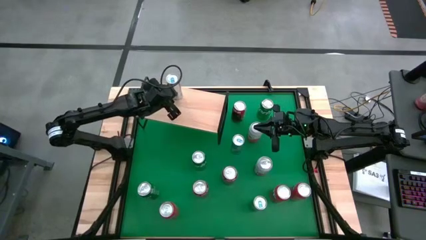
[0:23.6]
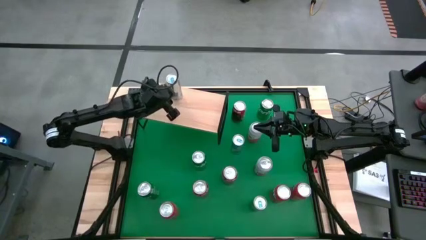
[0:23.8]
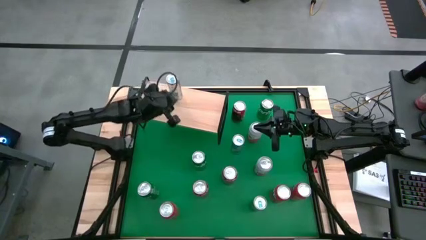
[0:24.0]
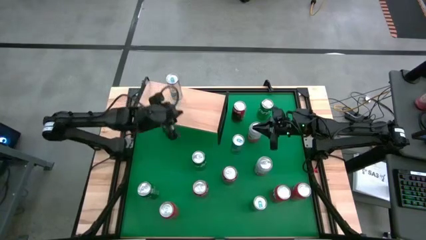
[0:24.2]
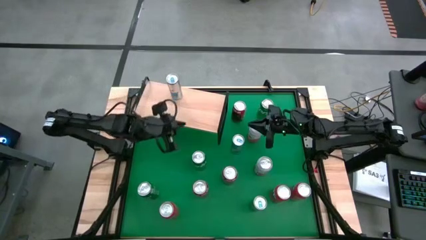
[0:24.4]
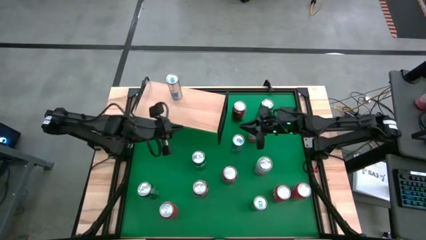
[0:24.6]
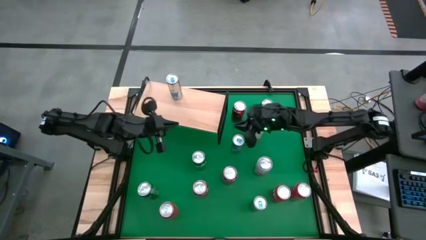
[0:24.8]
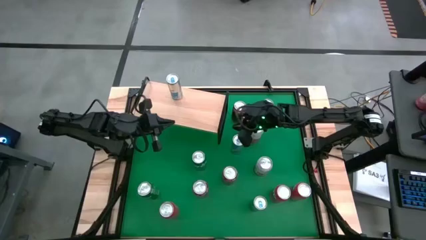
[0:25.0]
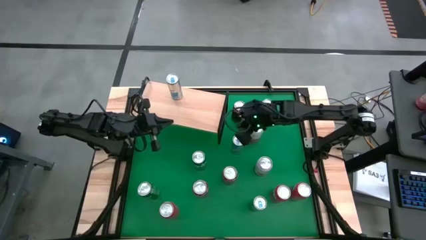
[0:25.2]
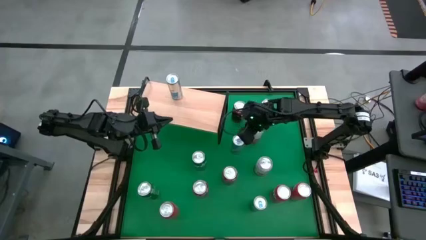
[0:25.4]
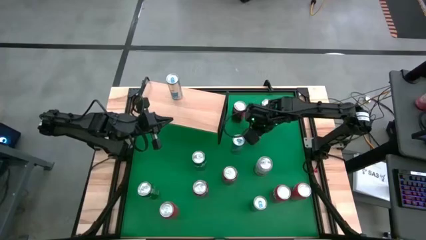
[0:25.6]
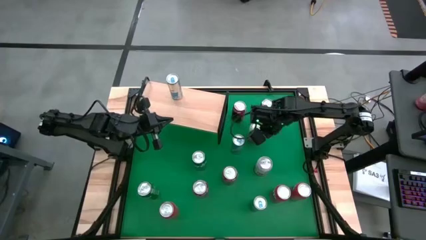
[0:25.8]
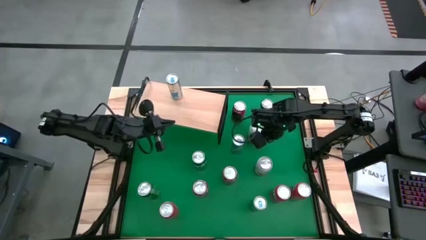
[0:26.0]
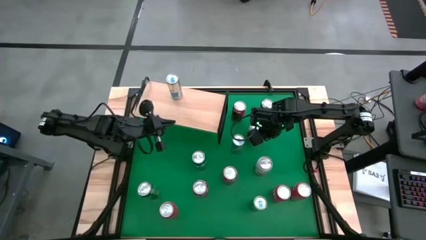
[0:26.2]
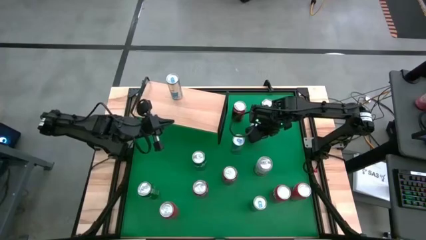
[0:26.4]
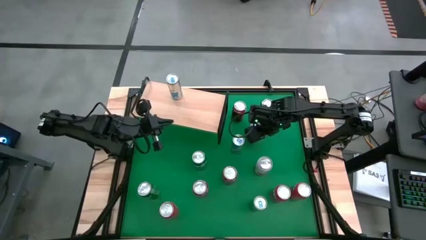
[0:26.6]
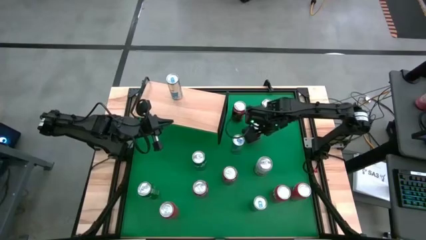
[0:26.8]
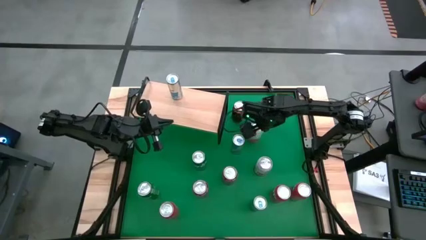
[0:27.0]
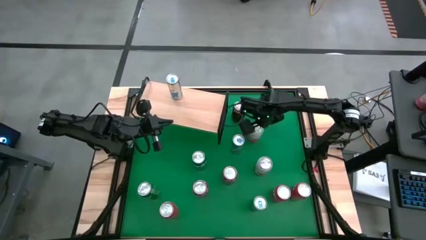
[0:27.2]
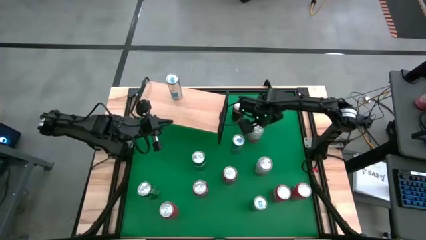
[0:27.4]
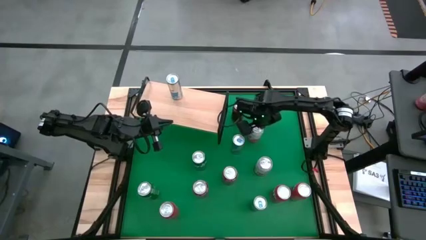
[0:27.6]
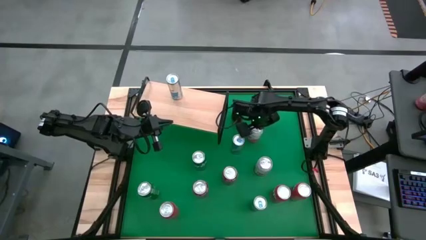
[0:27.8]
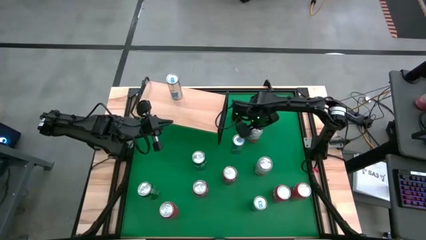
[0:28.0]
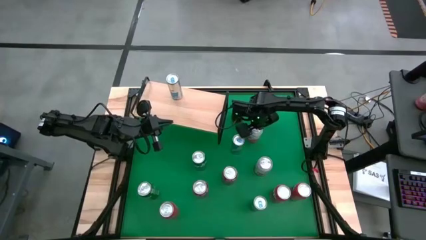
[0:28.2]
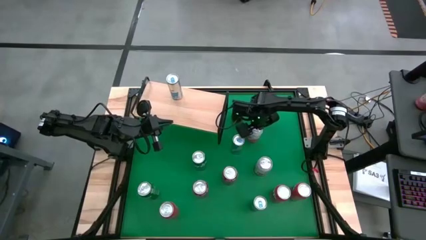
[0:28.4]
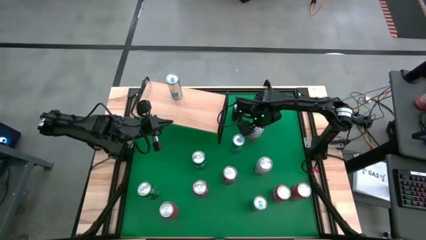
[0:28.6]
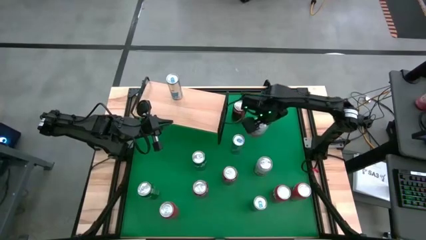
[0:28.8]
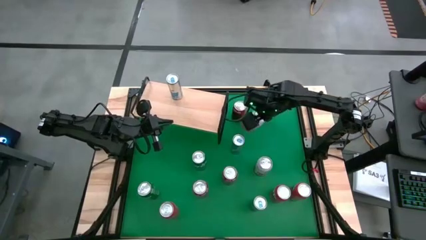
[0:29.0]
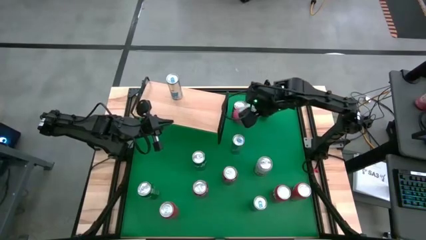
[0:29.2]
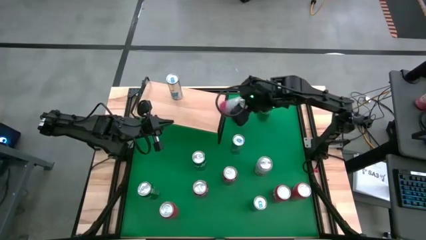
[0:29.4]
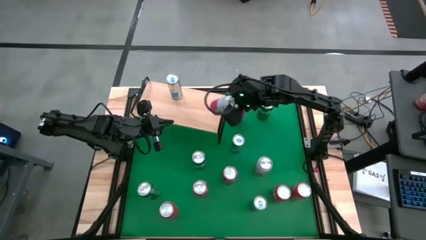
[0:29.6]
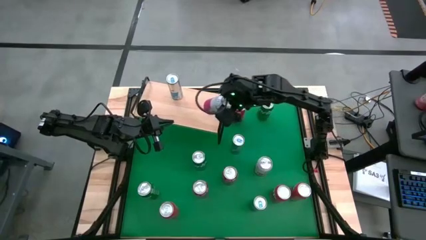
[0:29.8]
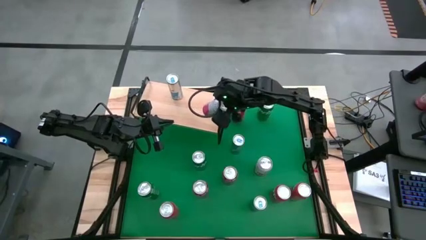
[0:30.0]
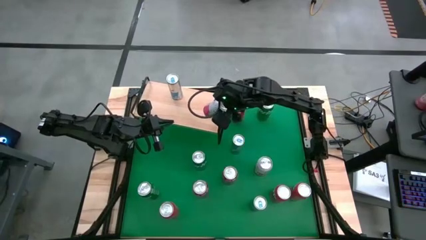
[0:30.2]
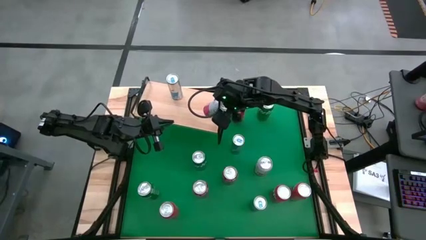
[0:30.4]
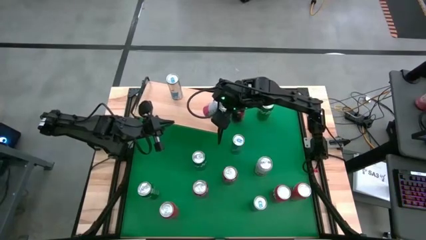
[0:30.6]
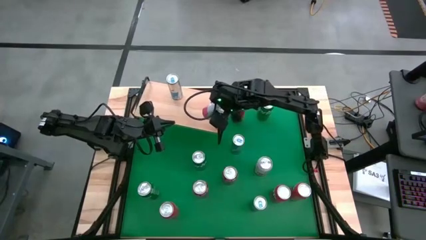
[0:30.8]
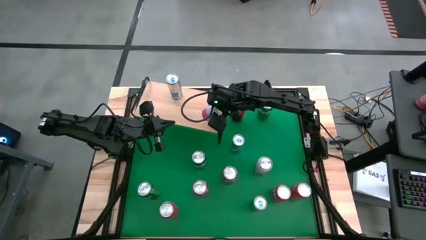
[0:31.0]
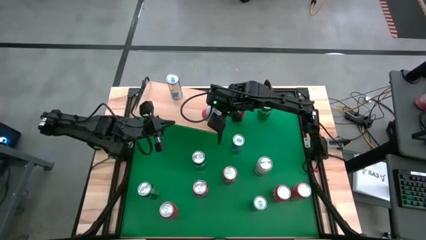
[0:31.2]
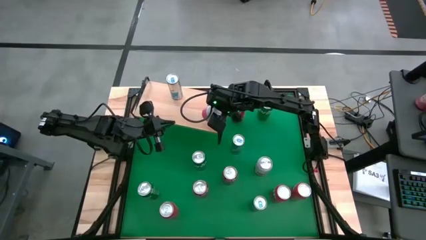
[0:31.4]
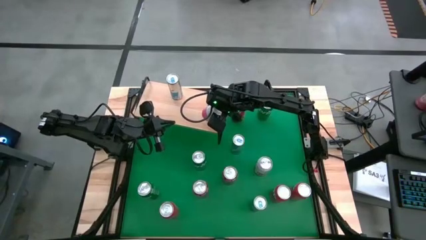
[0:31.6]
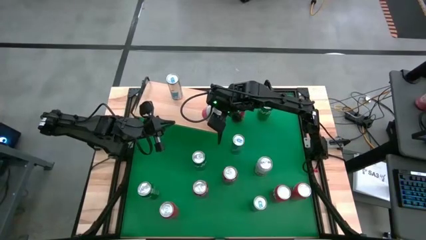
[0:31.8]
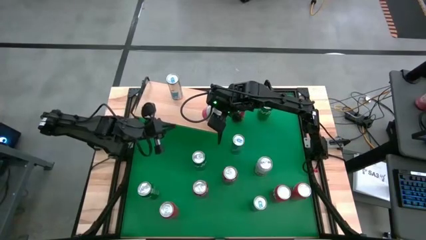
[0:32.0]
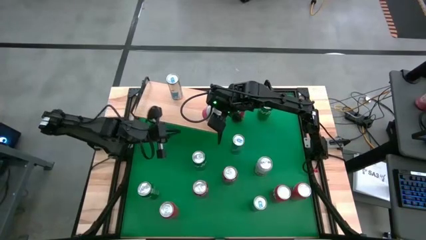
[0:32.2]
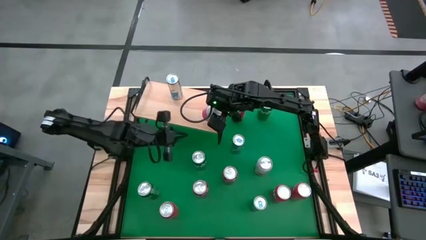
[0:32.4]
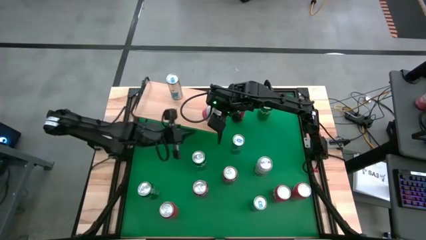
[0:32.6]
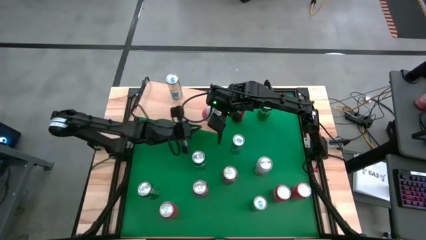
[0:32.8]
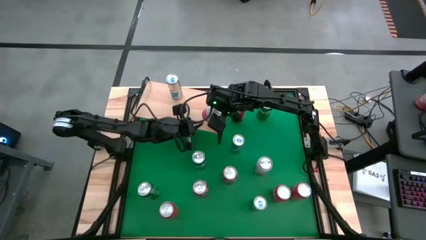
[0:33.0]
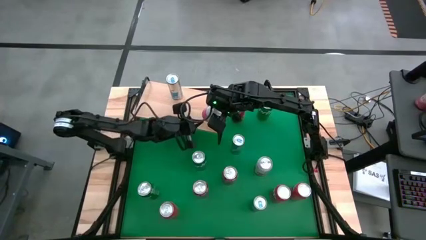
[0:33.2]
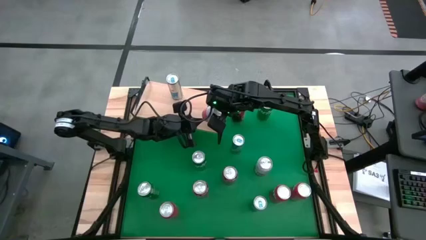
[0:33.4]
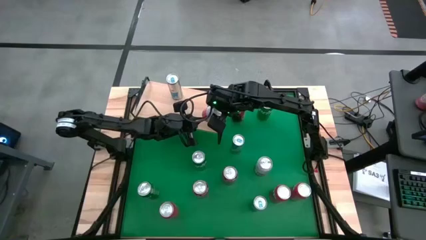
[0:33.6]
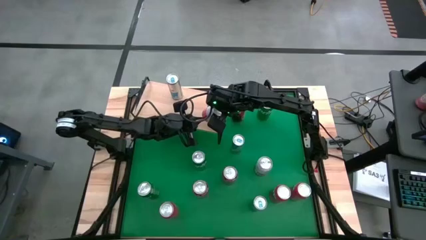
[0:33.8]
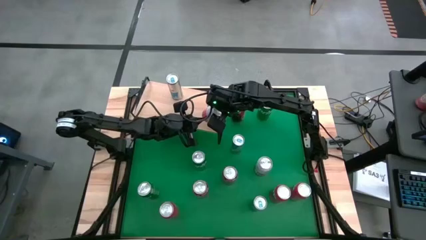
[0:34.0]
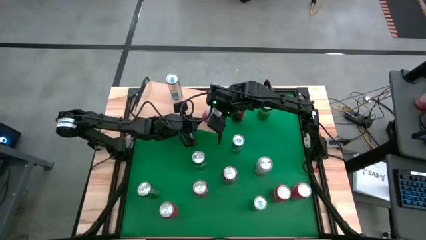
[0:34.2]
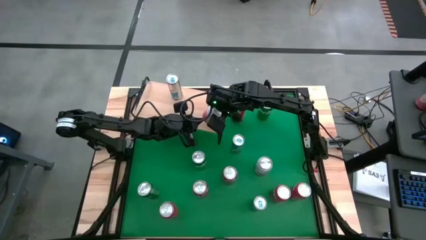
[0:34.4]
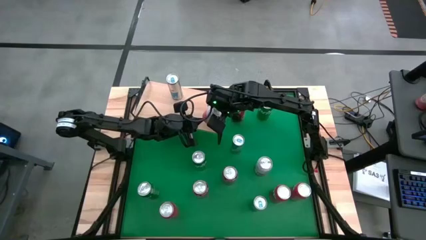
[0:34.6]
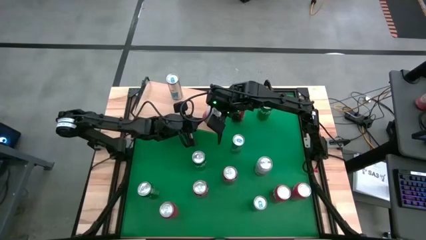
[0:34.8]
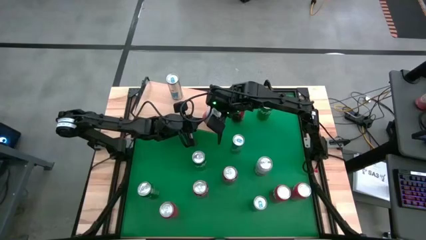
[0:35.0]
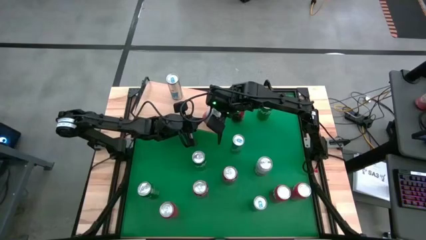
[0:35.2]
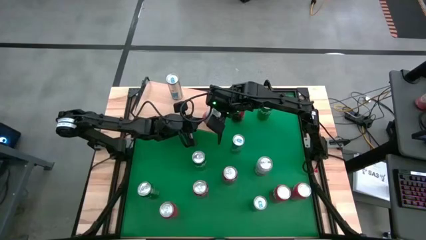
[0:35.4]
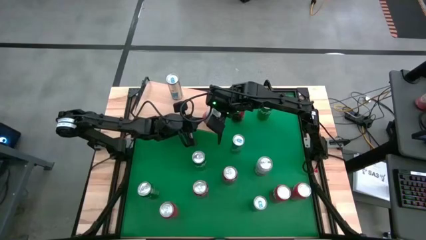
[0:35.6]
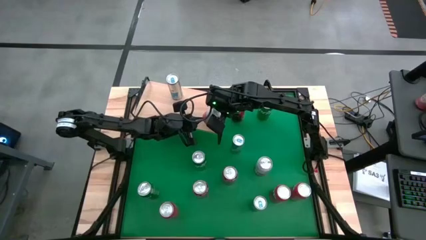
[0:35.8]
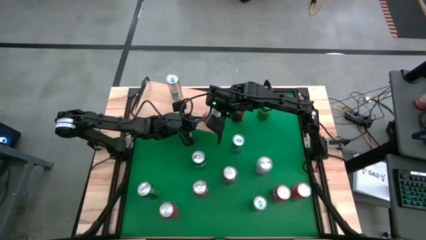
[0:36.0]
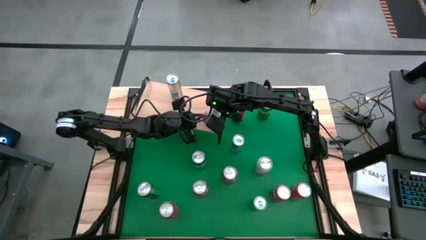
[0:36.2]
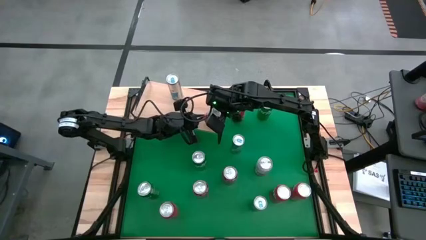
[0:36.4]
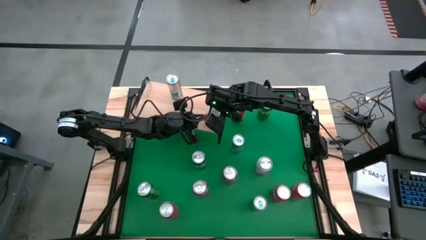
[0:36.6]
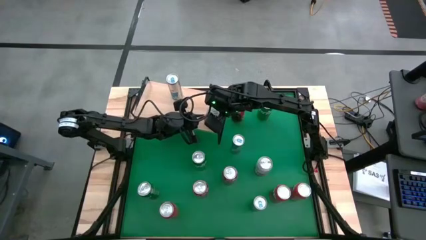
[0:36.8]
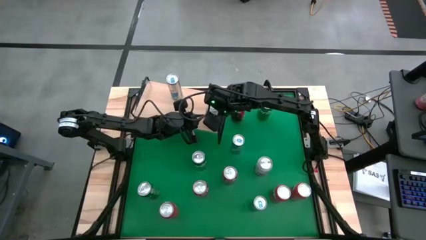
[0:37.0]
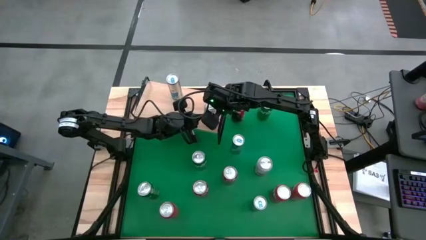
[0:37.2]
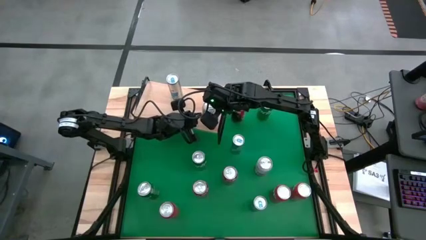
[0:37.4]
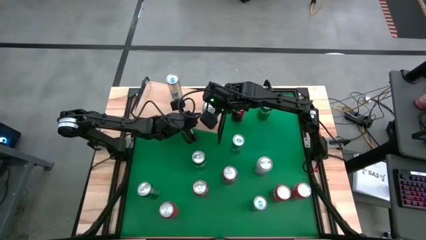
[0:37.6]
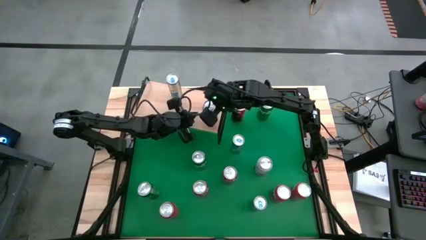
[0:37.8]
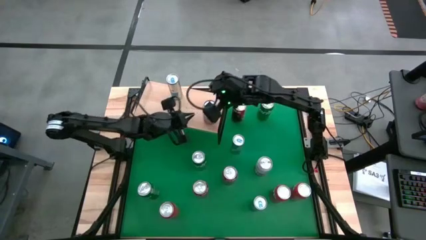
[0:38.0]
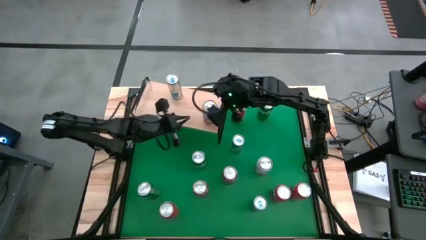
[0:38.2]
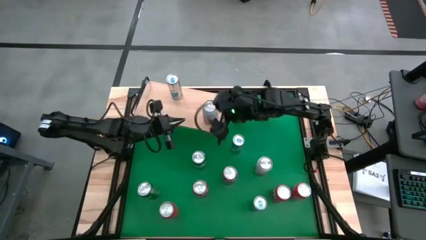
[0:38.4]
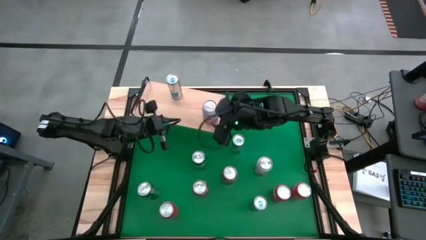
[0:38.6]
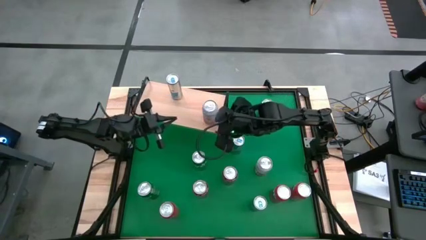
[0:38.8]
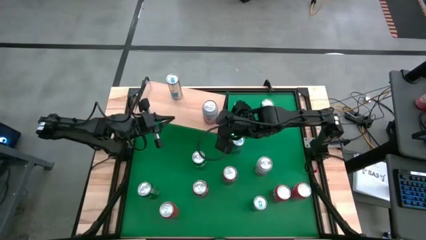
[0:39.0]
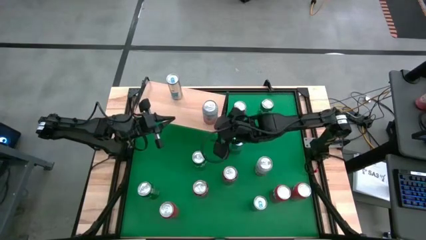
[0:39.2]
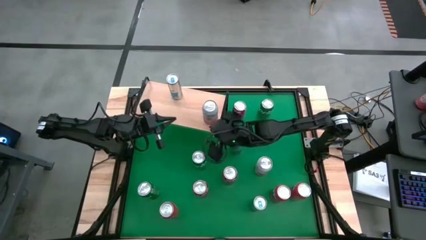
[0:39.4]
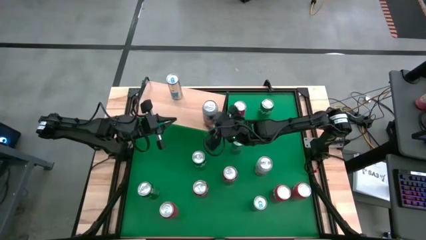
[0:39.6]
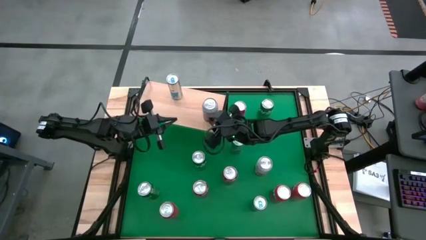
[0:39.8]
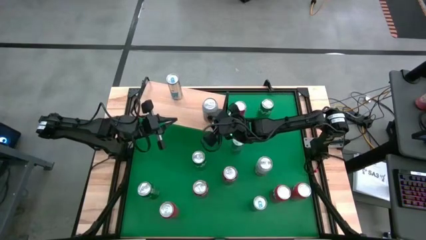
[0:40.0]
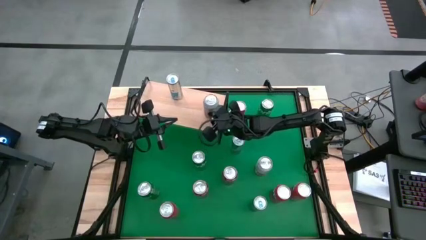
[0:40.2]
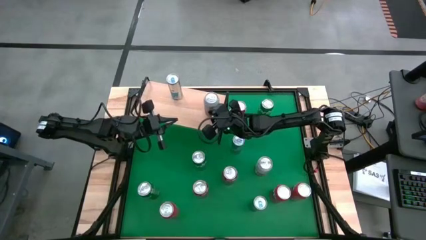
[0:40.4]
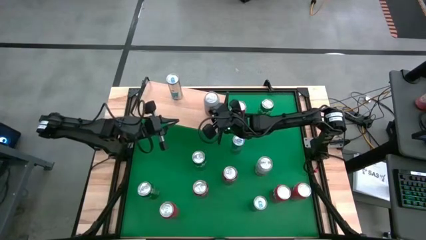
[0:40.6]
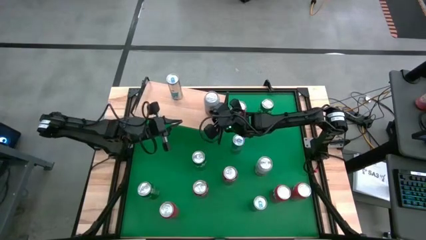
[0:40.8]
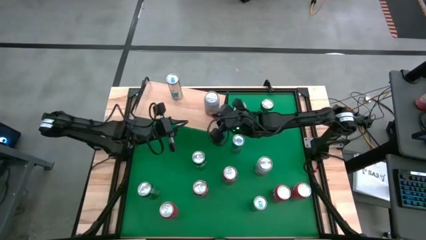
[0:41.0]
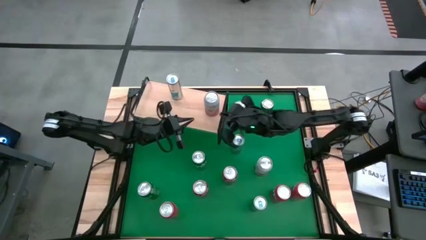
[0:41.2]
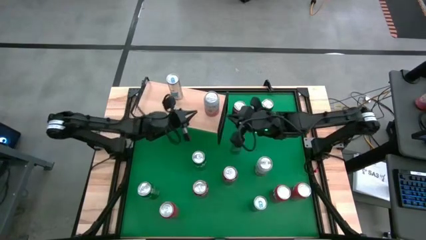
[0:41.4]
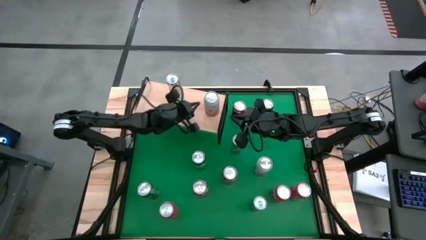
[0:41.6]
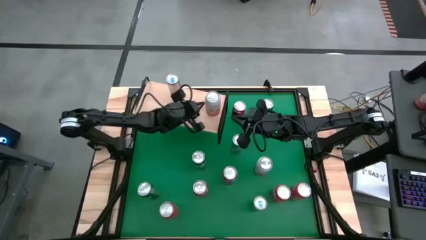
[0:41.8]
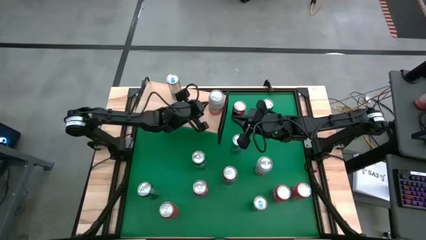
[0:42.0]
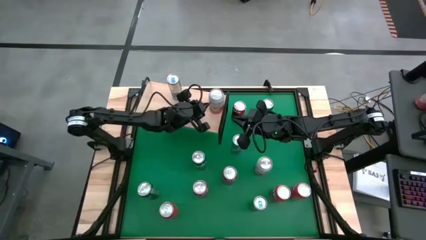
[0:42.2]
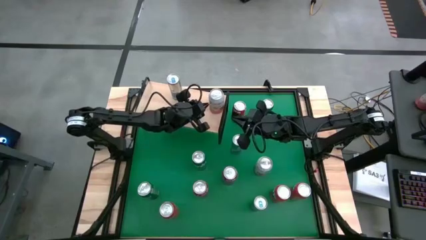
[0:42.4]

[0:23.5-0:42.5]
Task: Place canned beverage on shelf
Put the pink/white soda can on the shelf
